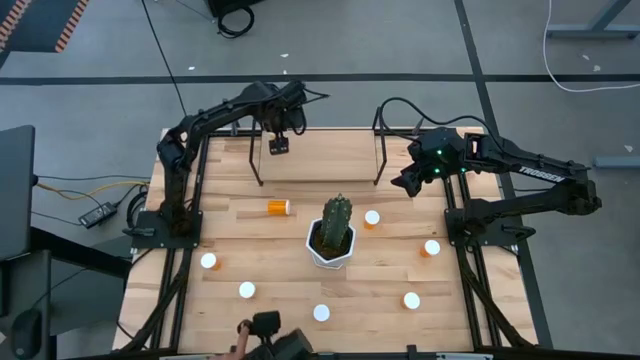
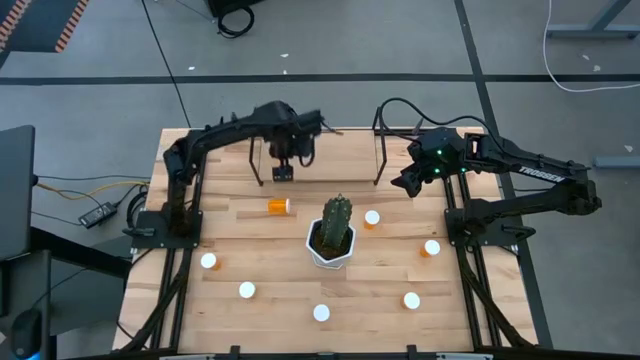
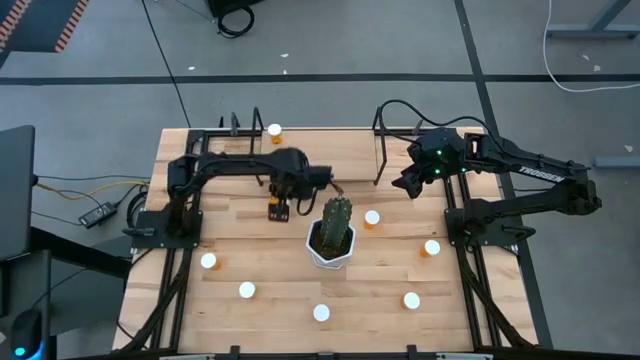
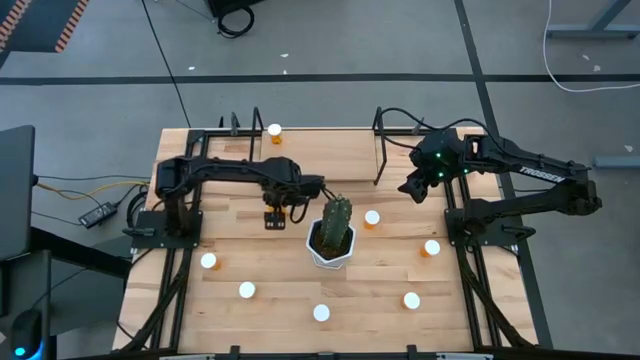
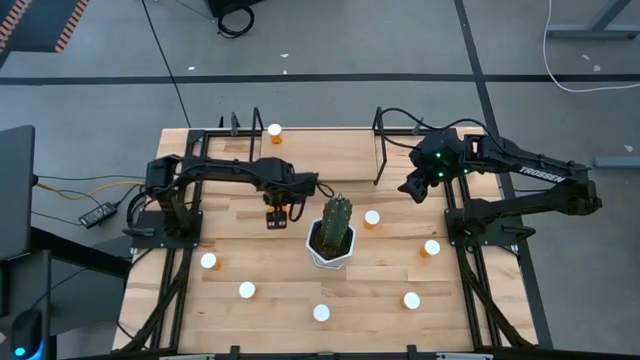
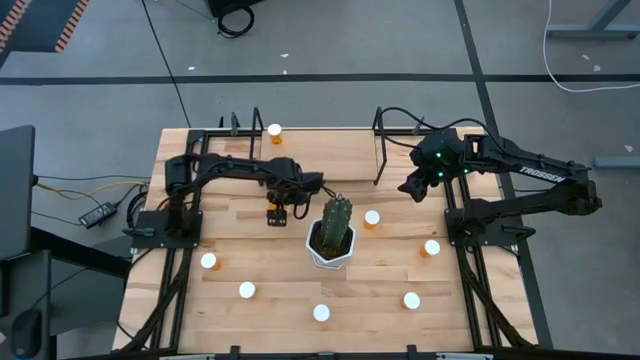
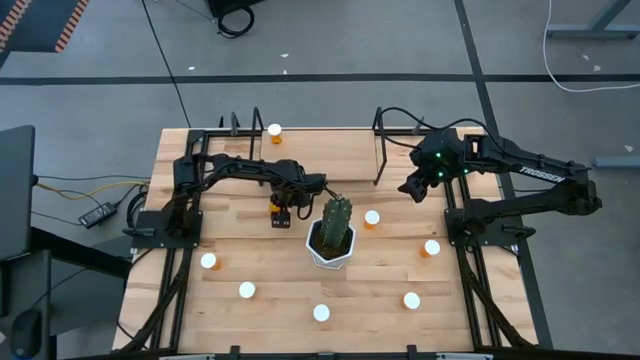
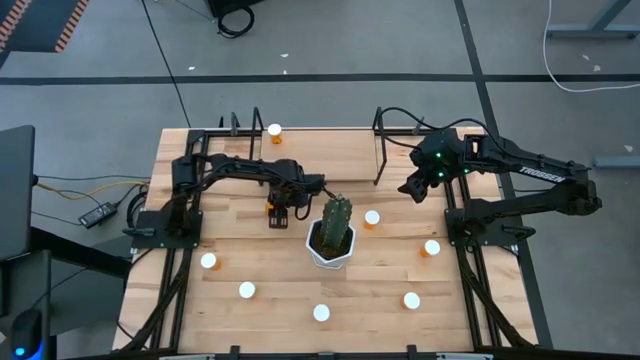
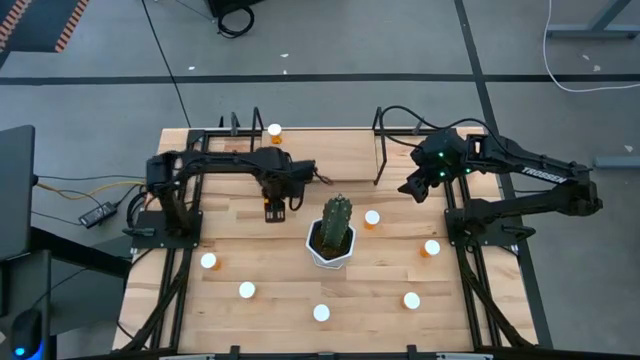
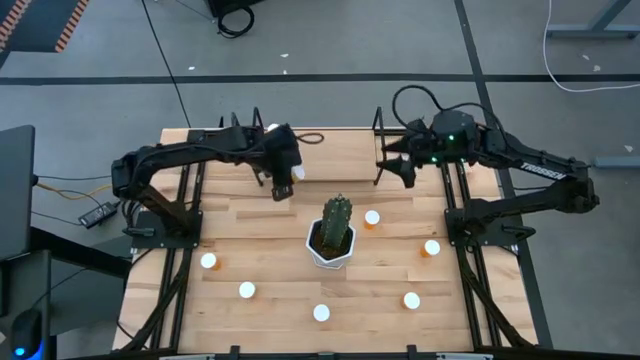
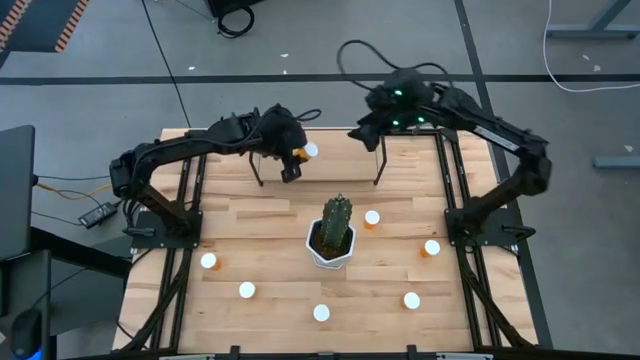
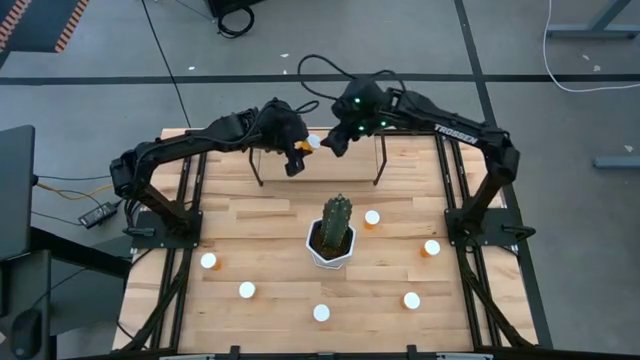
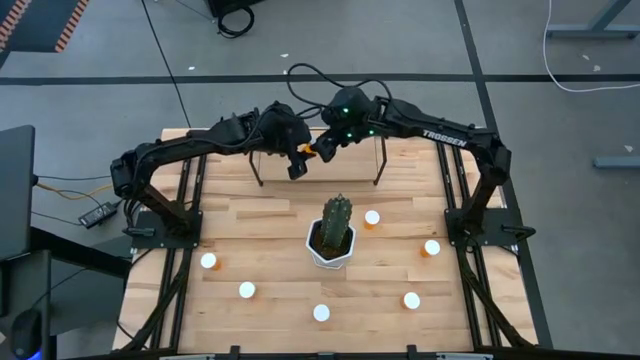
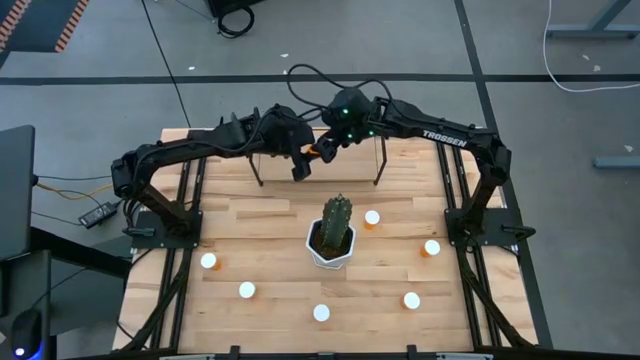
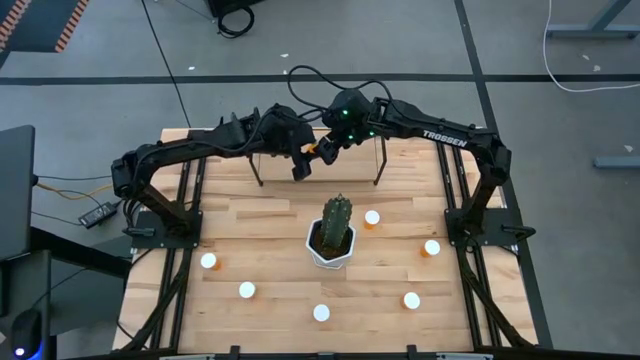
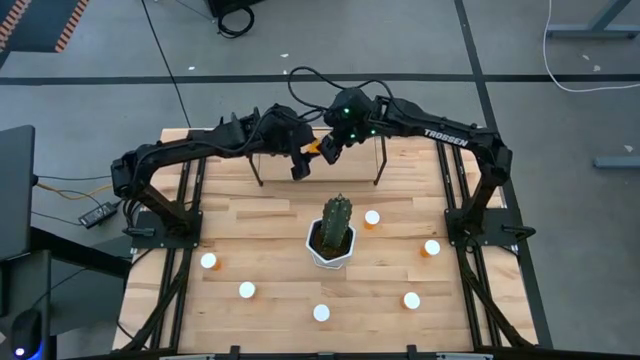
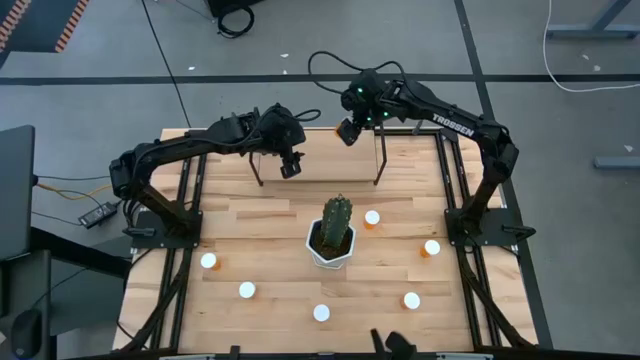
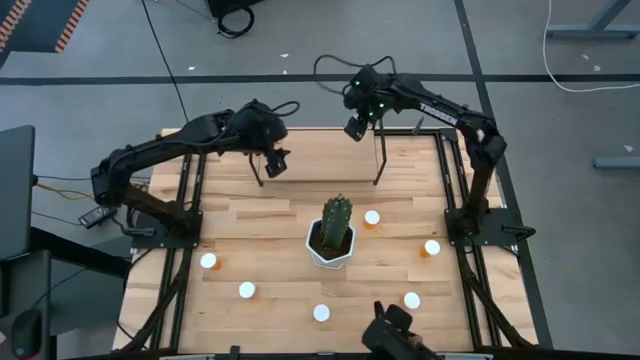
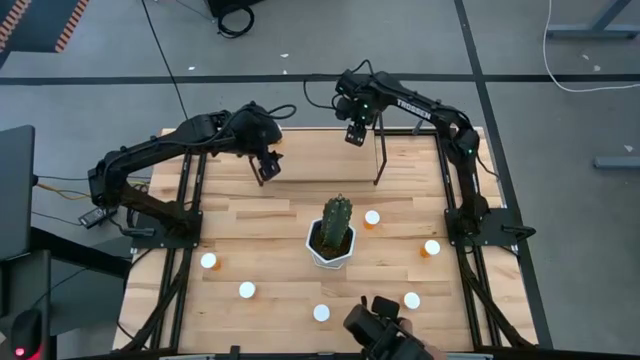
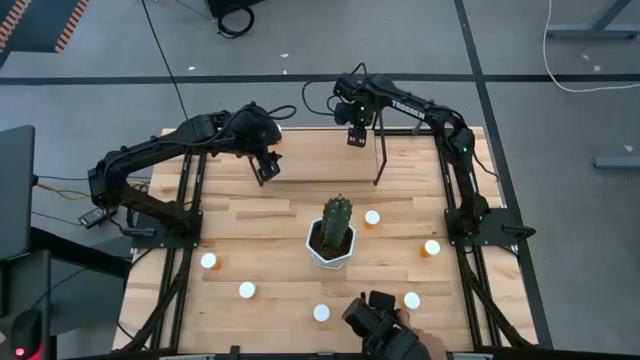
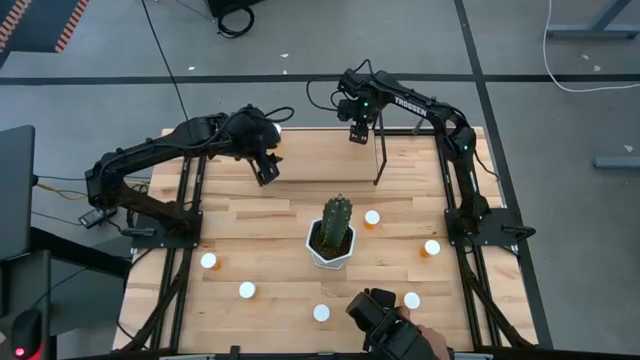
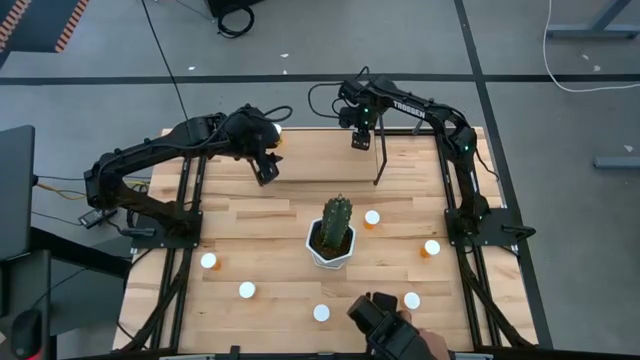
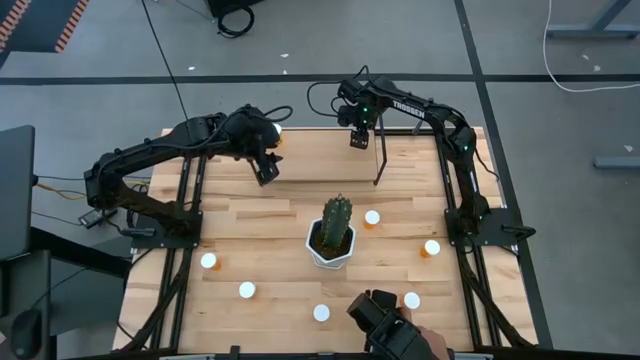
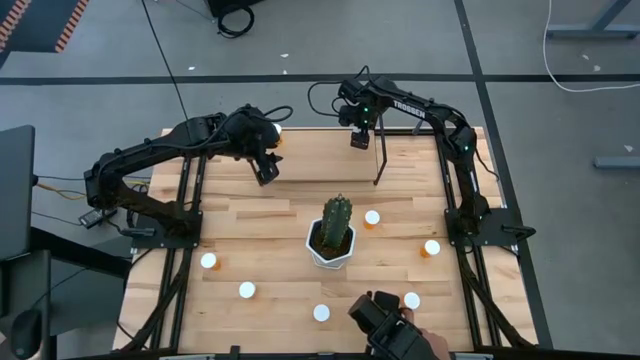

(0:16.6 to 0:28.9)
Task: Pick and place medicine bottles onto shelf by color
Put the orange medicine bottle on the shelf

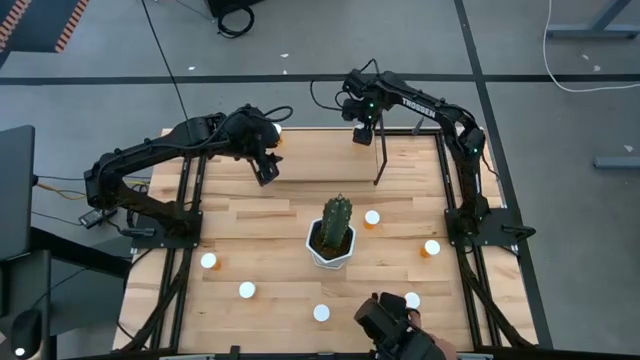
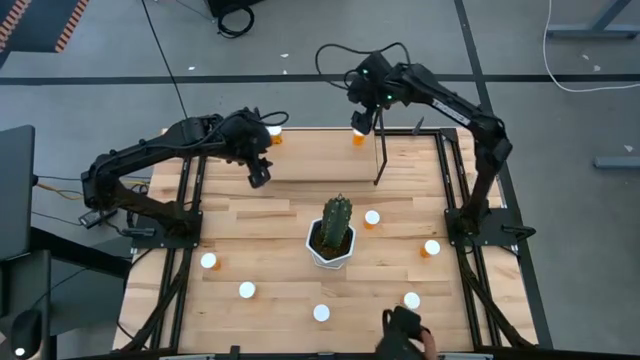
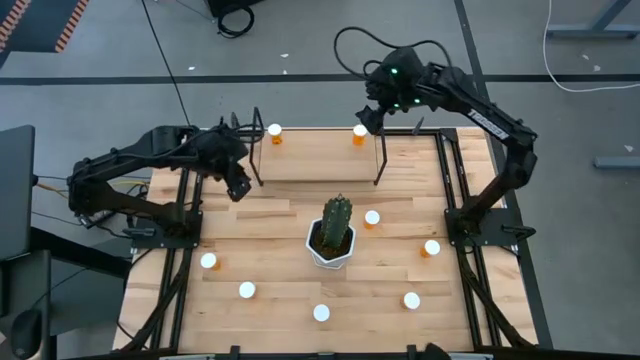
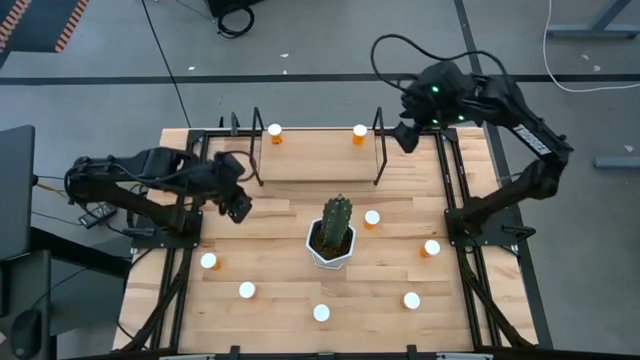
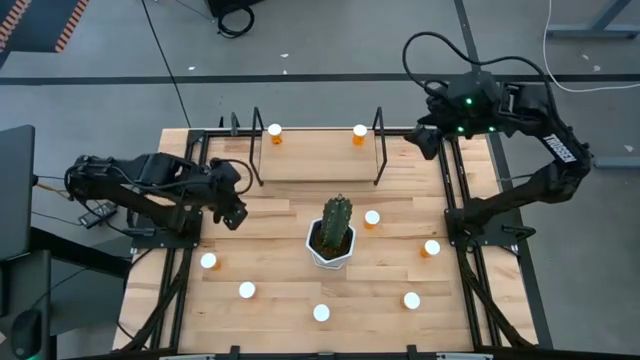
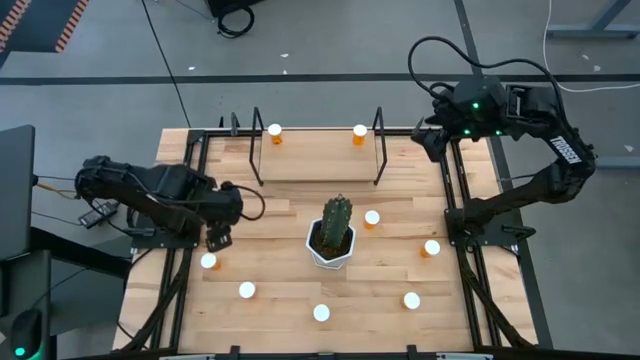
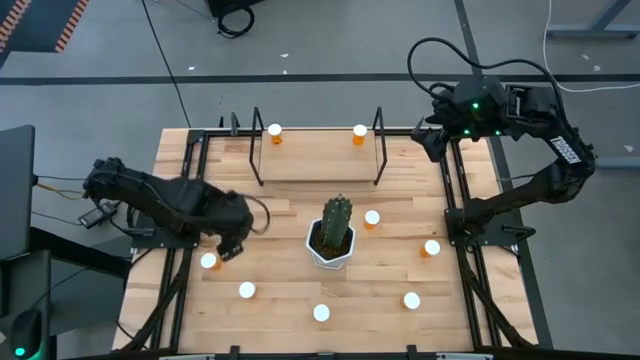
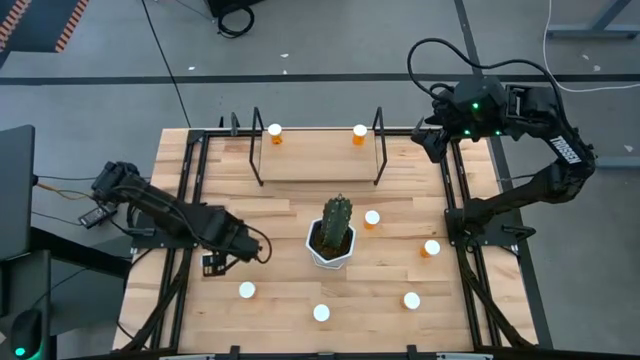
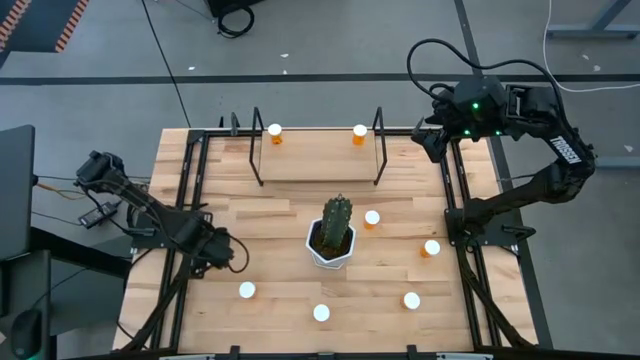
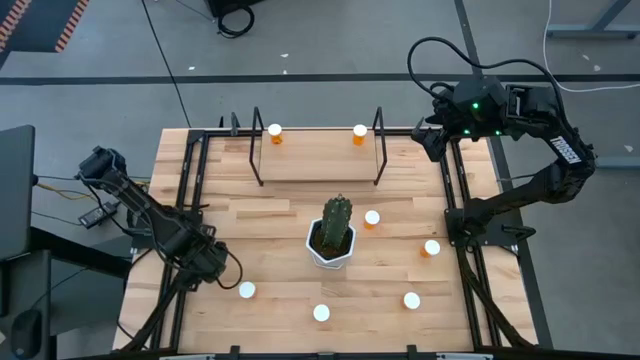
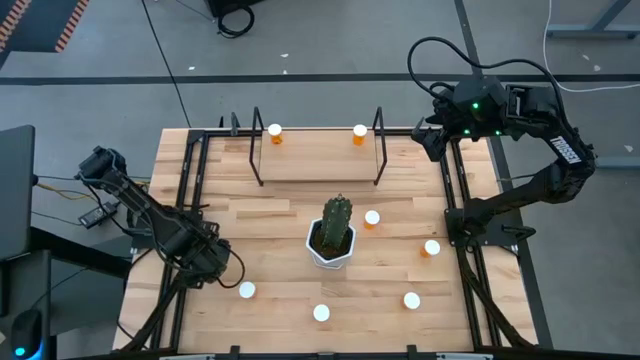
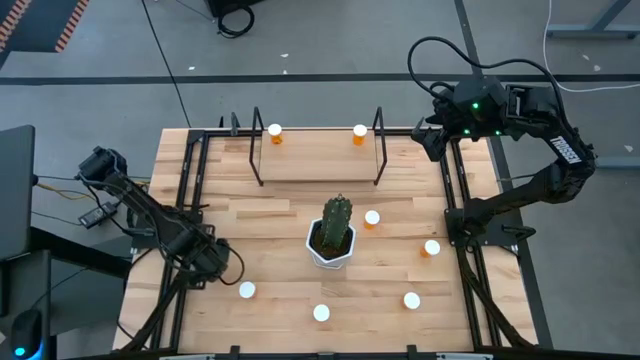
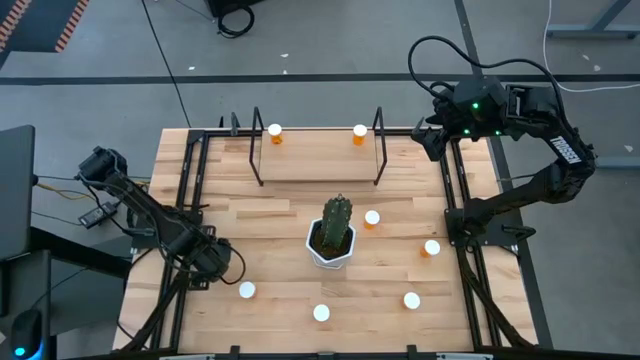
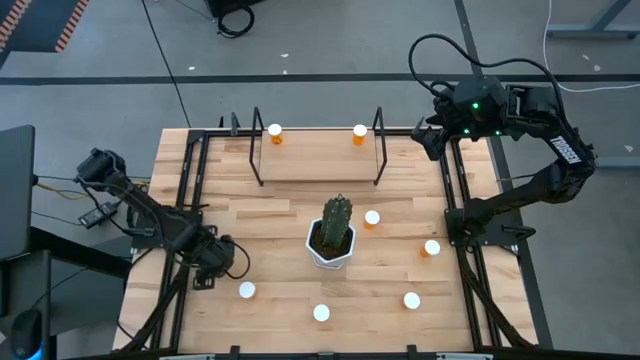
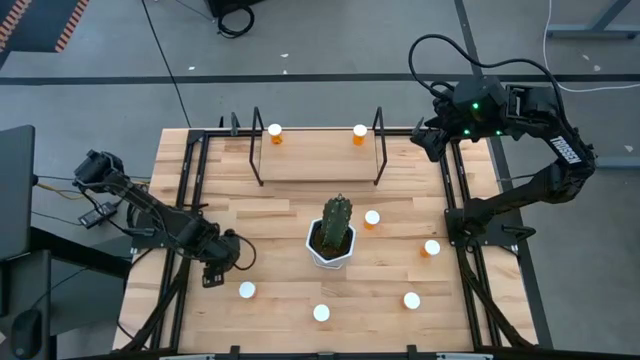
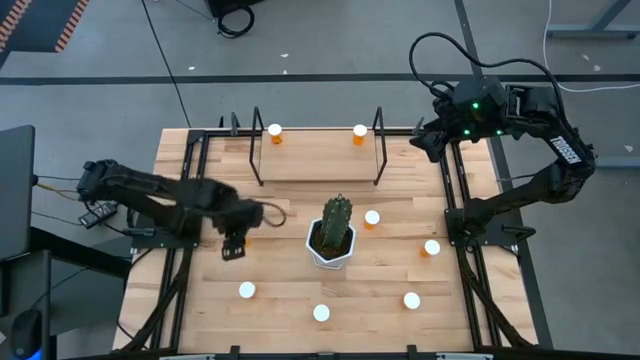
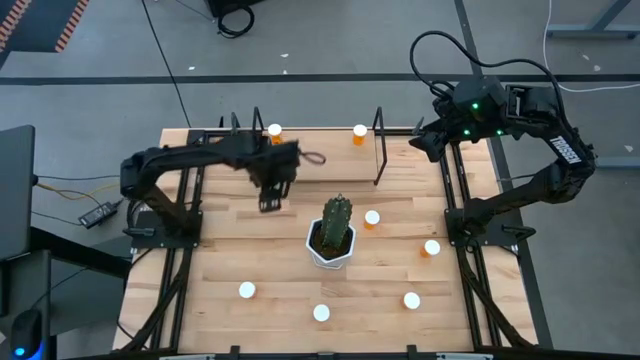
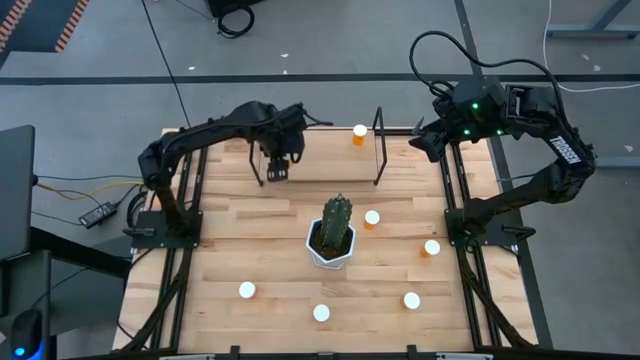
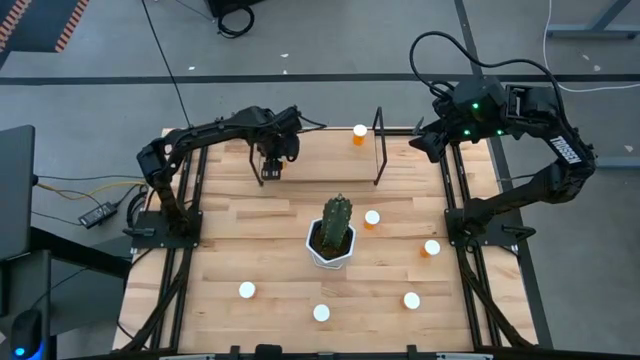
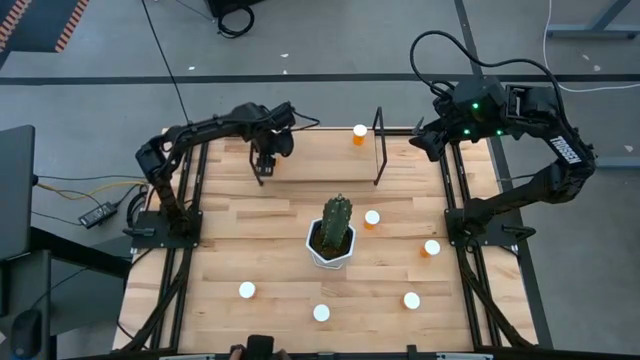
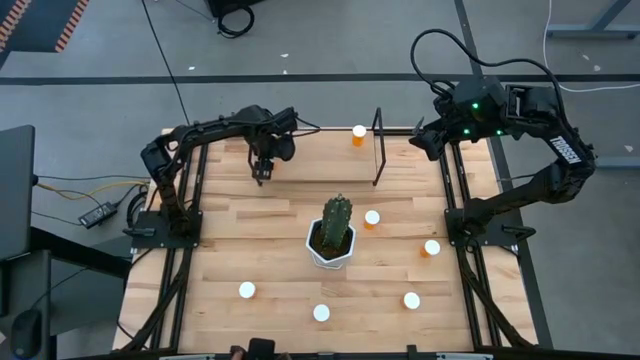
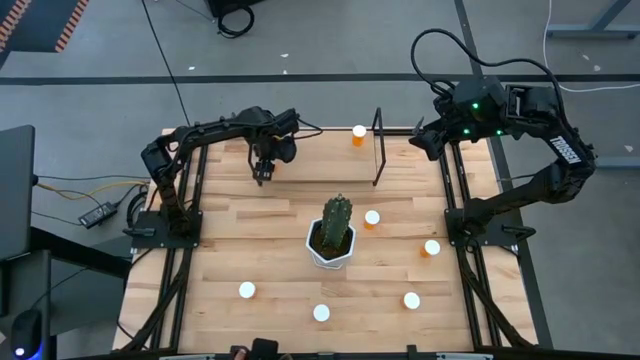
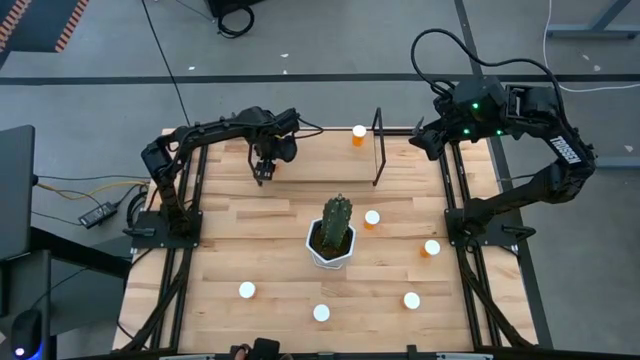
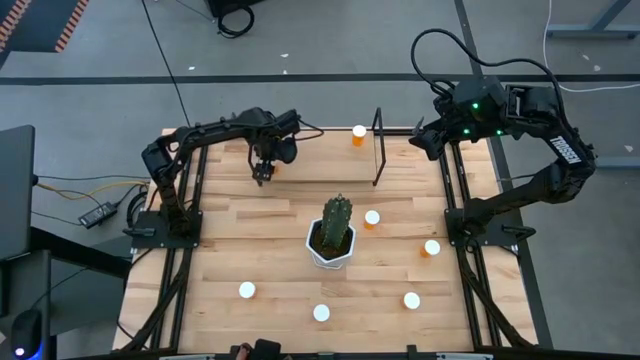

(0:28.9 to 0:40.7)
Put the orange medicine bottle on the shelf
